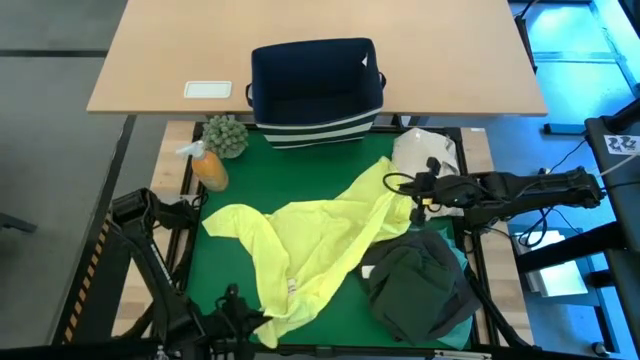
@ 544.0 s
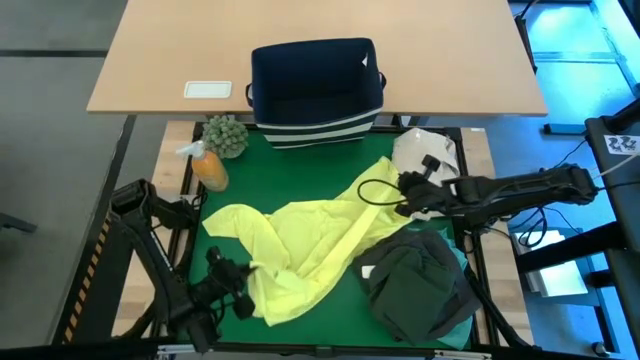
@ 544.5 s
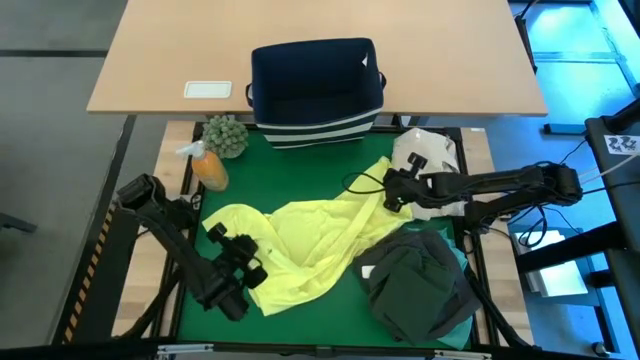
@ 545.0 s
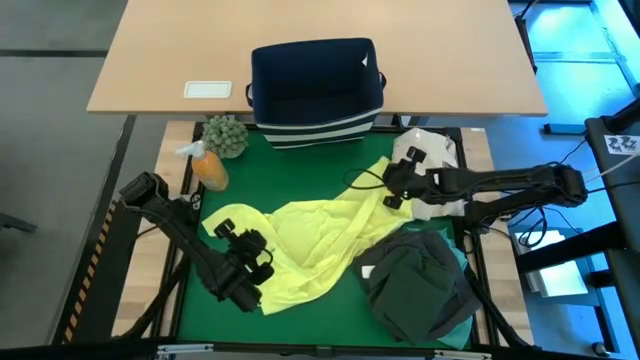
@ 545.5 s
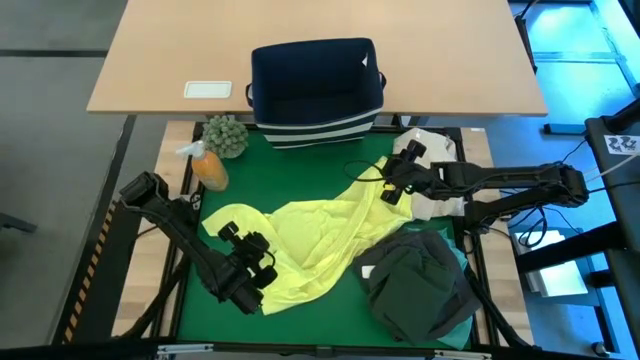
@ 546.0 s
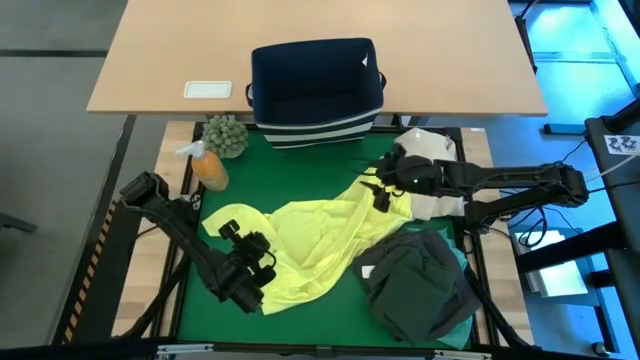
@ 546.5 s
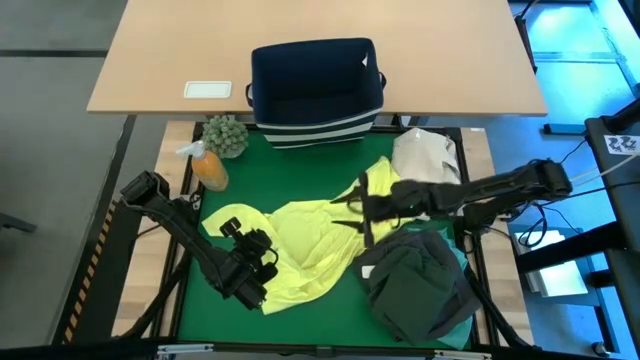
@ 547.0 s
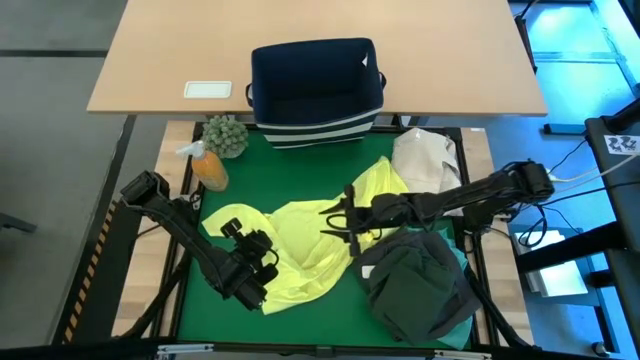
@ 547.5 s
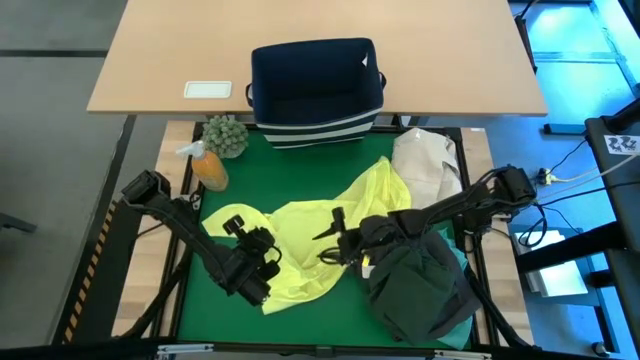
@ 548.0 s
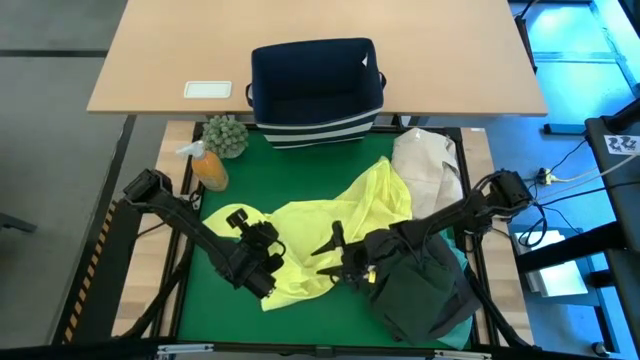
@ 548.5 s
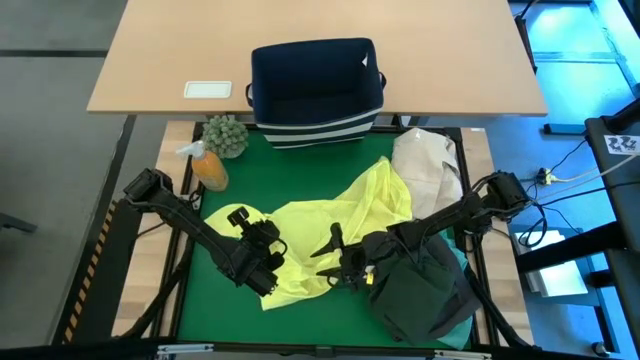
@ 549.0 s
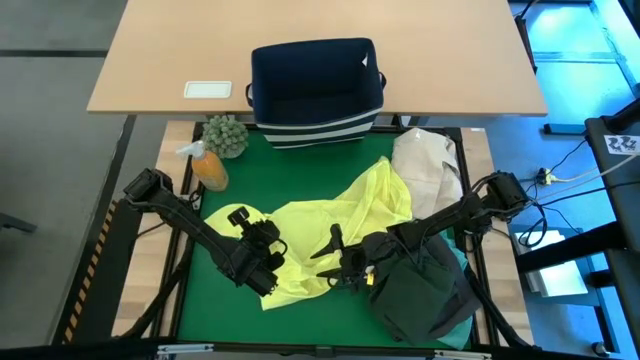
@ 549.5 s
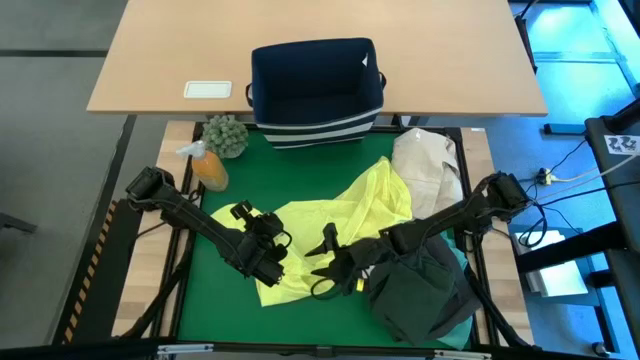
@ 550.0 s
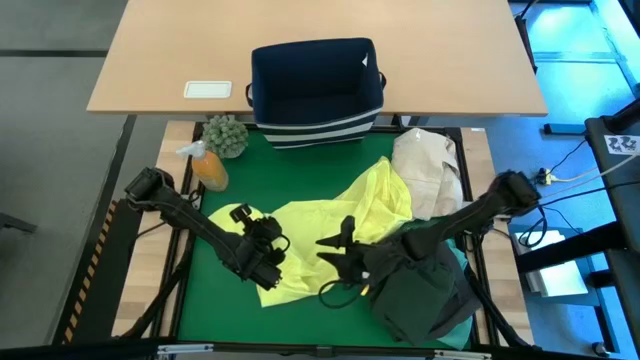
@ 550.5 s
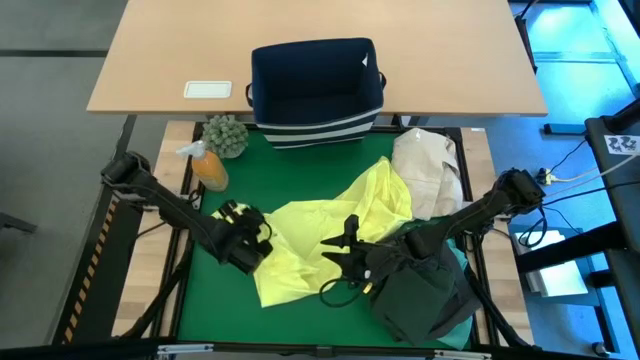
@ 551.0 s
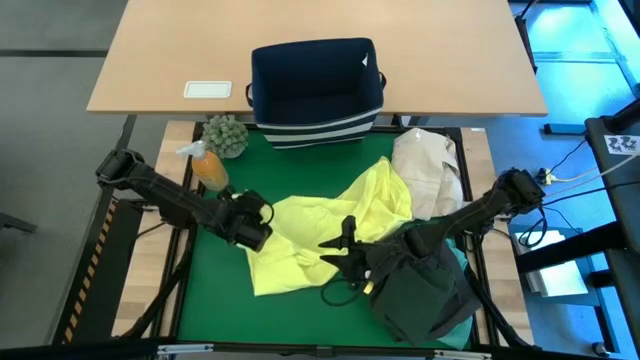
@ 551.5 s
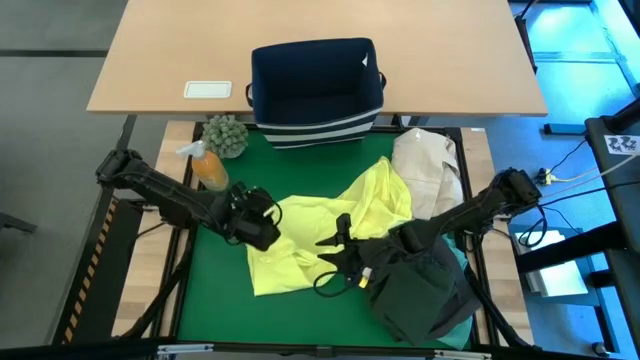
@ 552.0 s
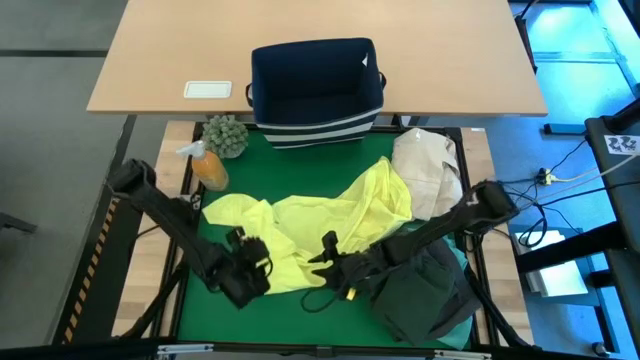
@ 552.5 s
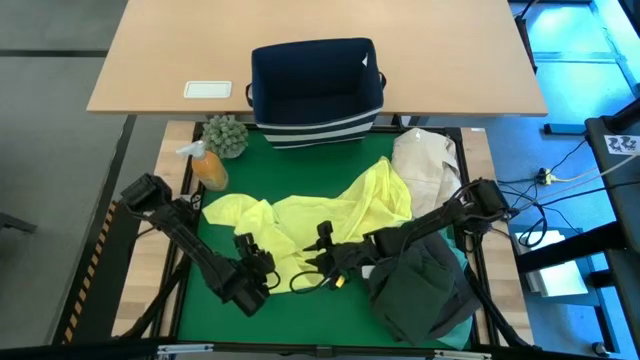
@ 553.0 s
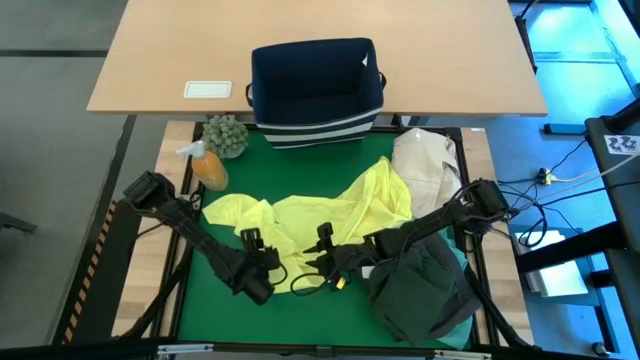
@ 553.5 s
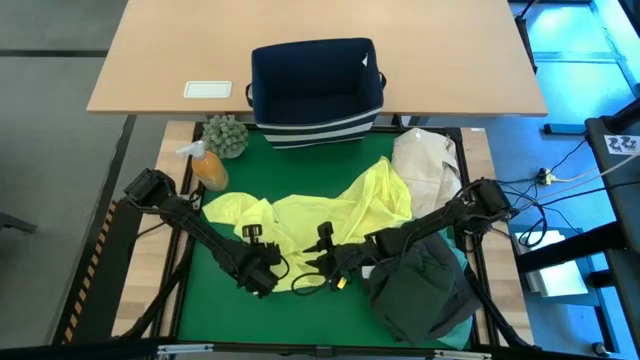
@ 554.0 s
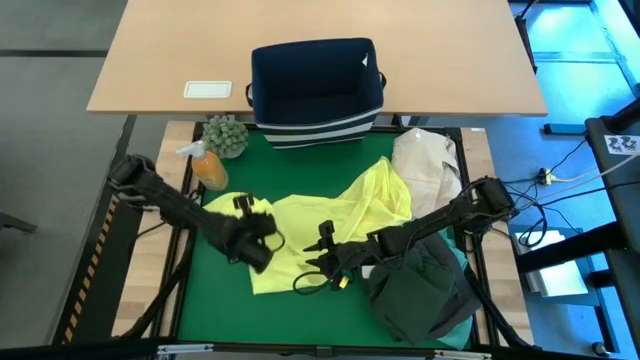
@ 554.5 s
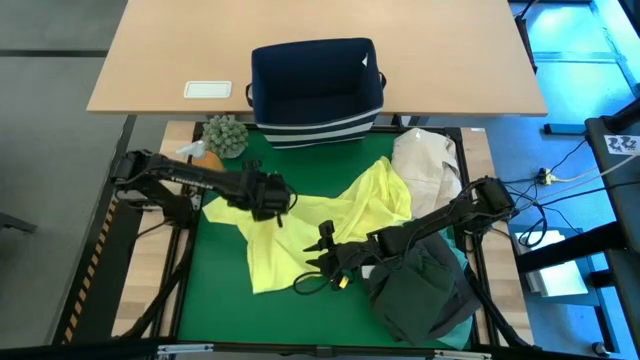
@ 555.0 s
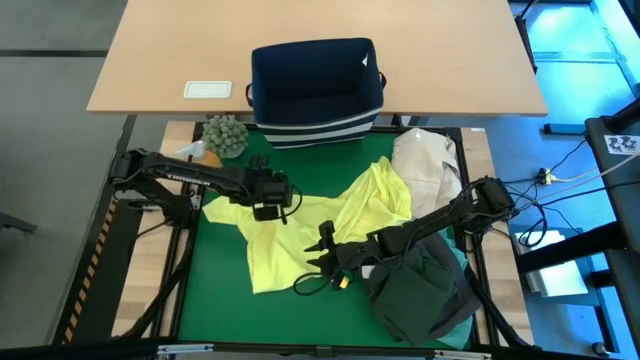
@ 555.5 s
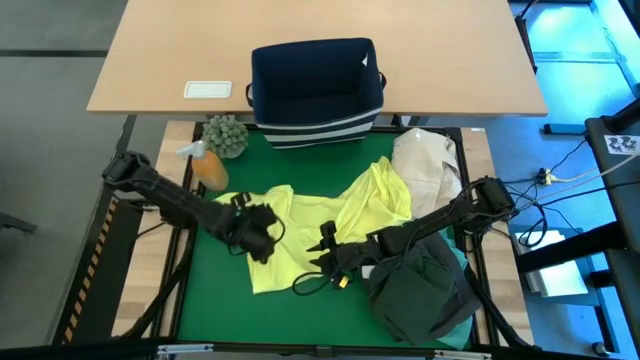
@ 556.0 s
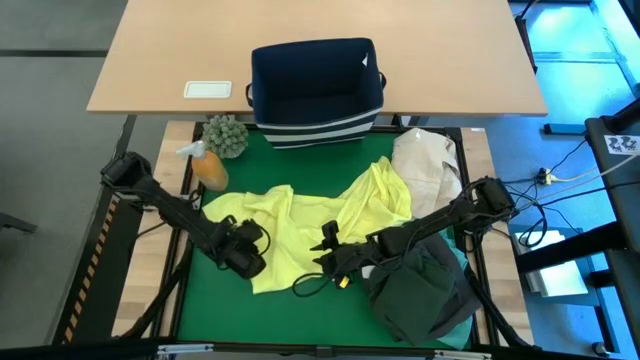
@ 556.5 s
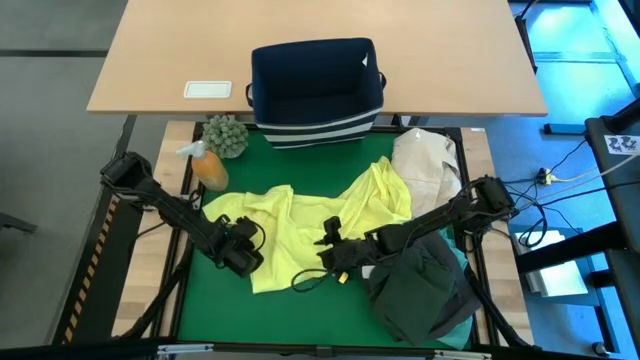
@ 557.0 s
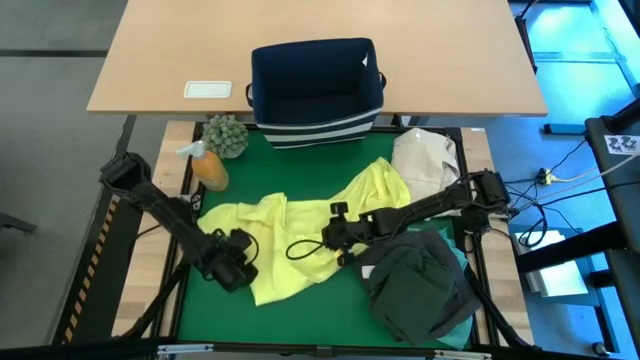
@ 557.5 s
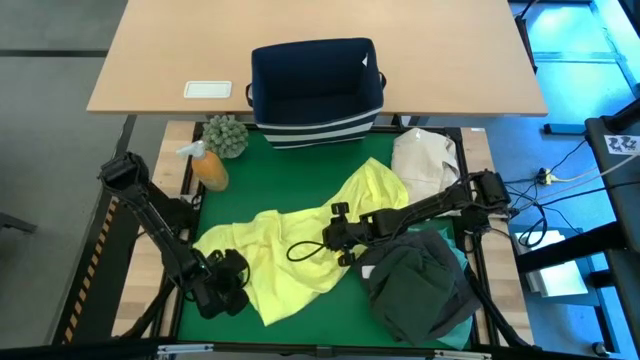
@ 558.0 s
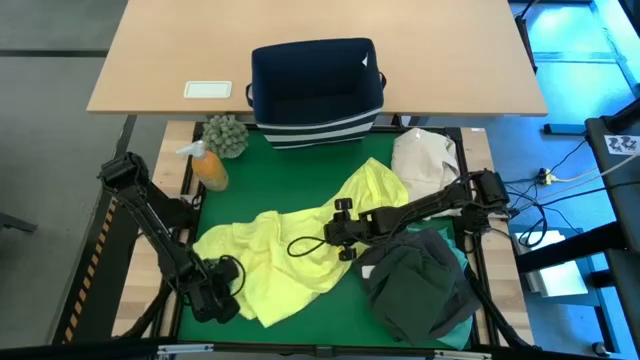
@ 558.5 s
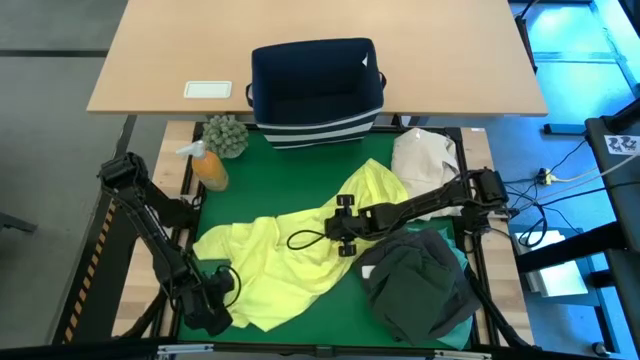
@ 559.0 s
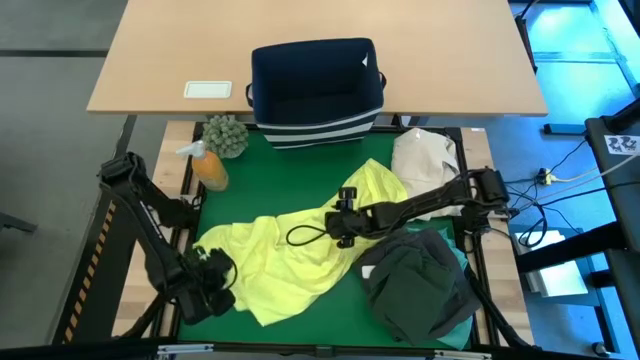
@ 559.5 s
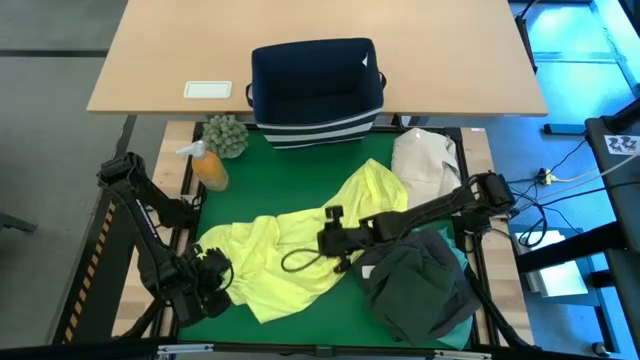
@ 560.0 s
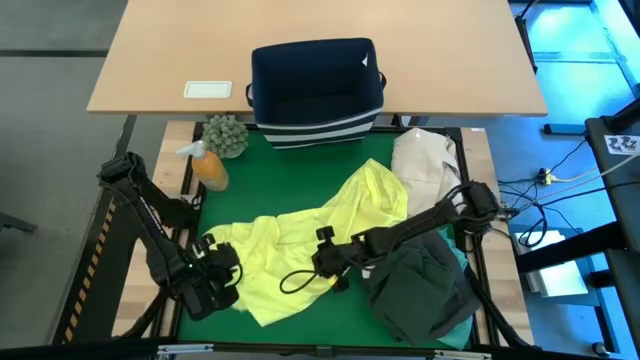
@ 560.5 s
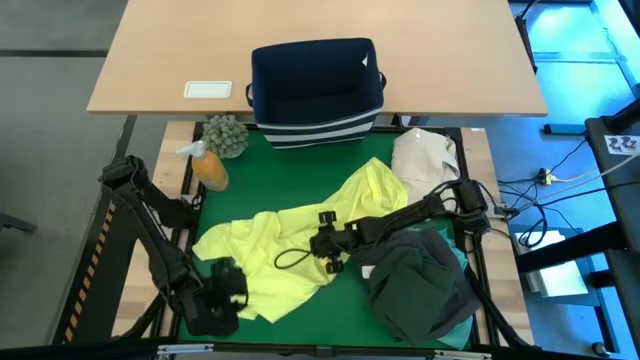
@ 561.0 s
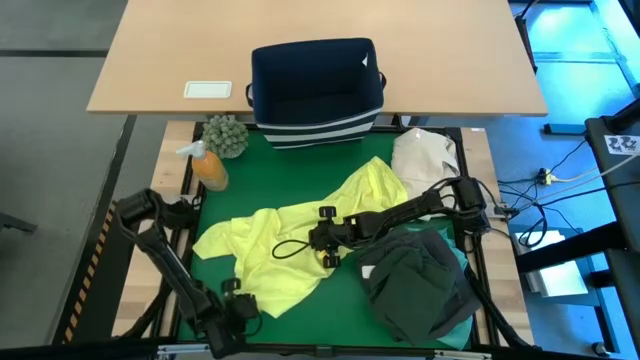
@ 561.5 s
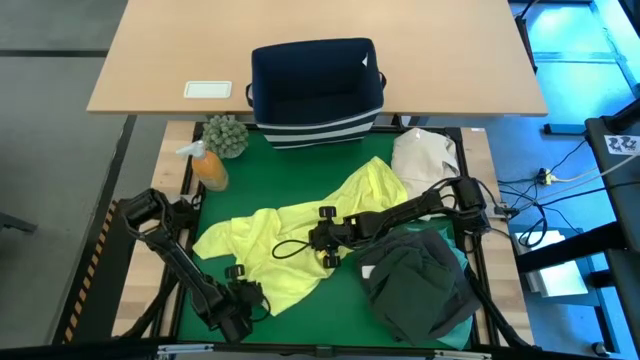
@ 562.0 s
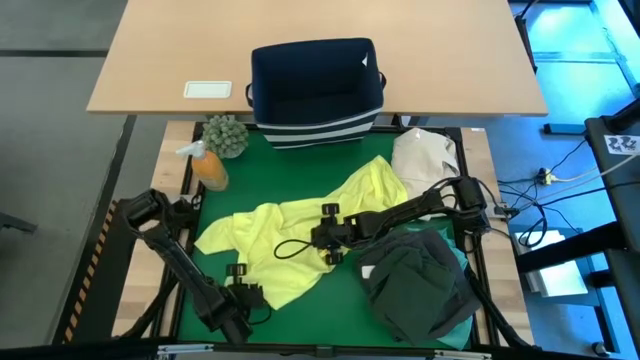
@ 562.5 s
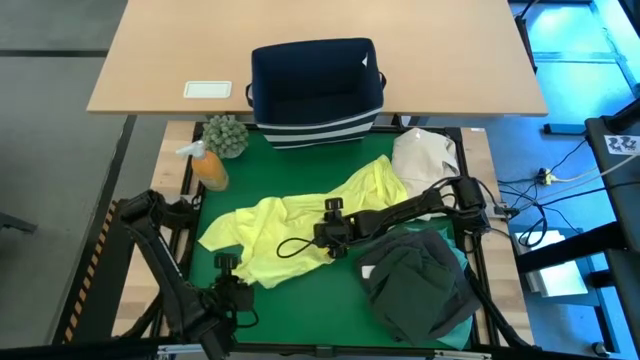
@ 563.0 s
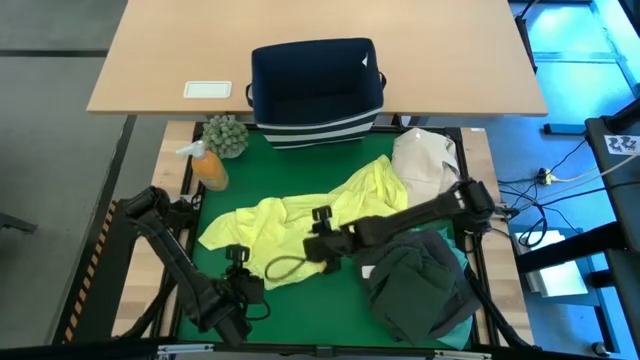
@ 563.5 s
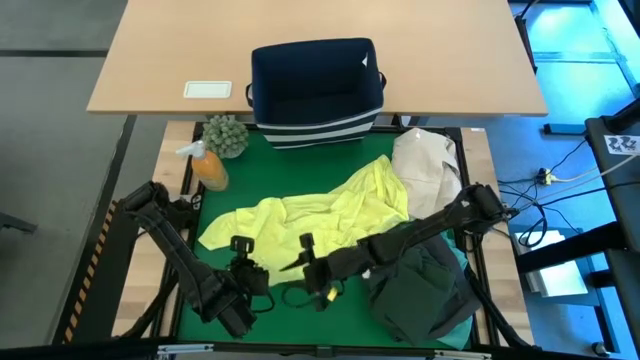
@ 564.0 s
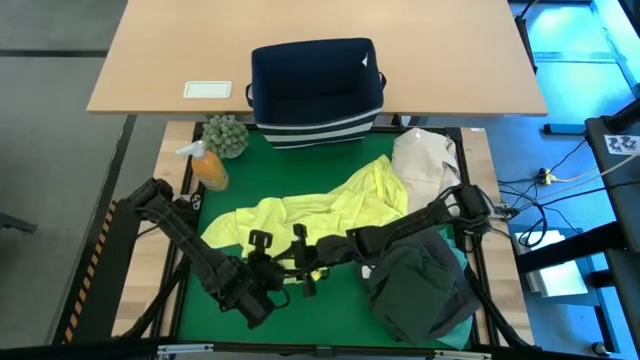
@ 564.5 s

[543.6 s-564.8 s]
Task: Fold laundry
Fold the yellow shirt on the table
